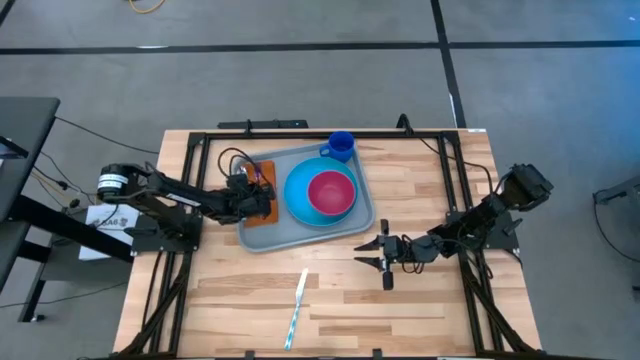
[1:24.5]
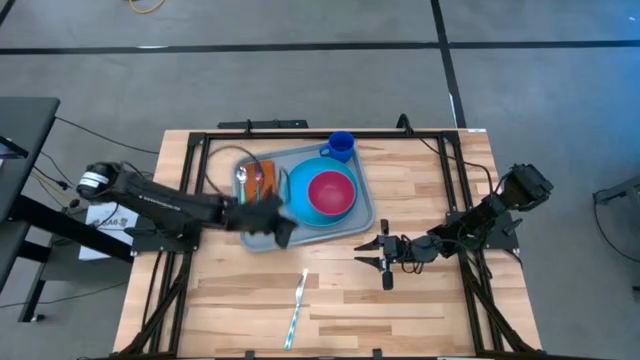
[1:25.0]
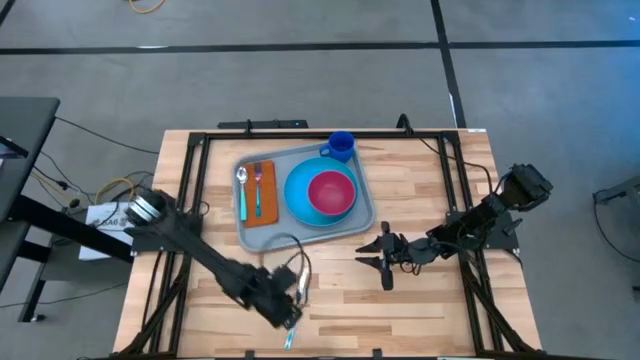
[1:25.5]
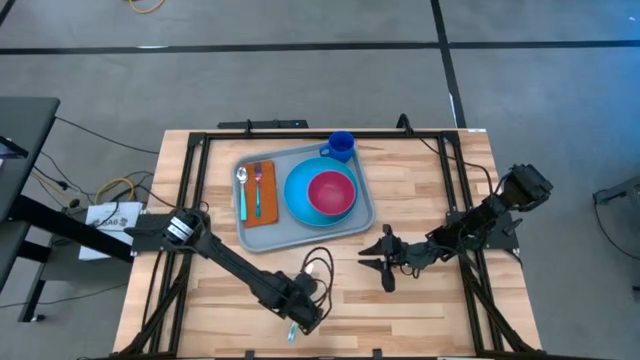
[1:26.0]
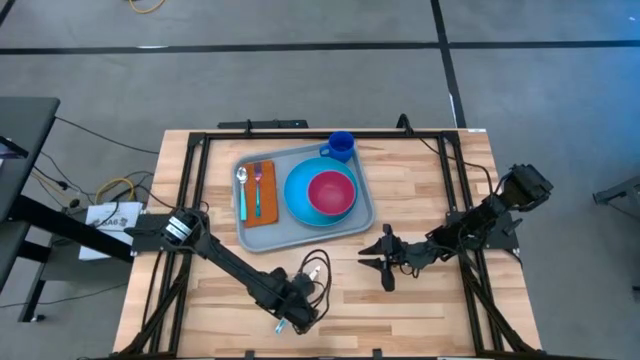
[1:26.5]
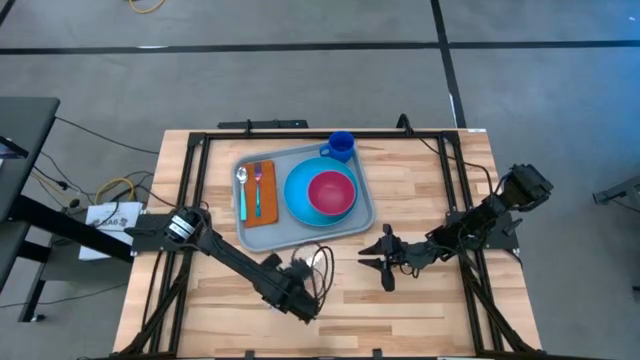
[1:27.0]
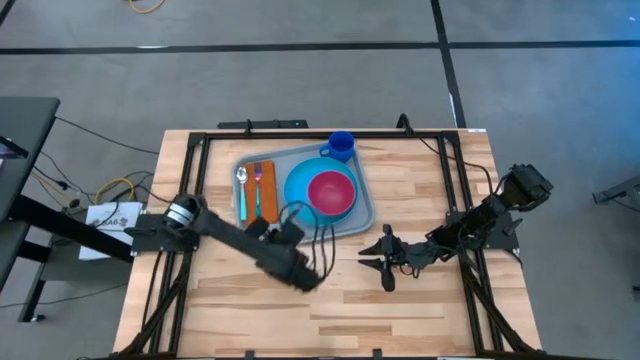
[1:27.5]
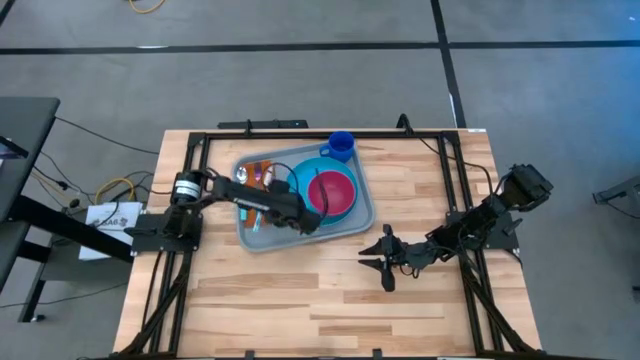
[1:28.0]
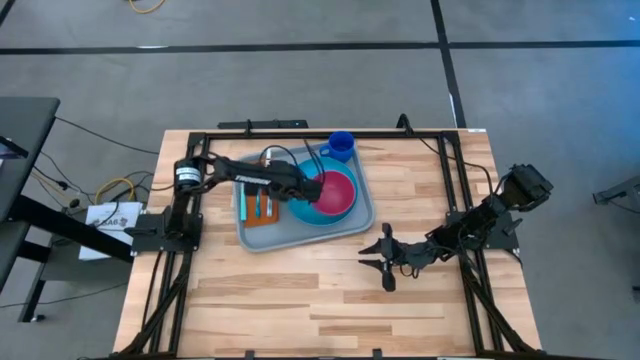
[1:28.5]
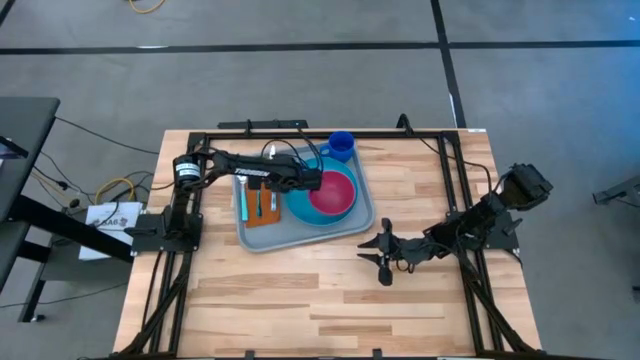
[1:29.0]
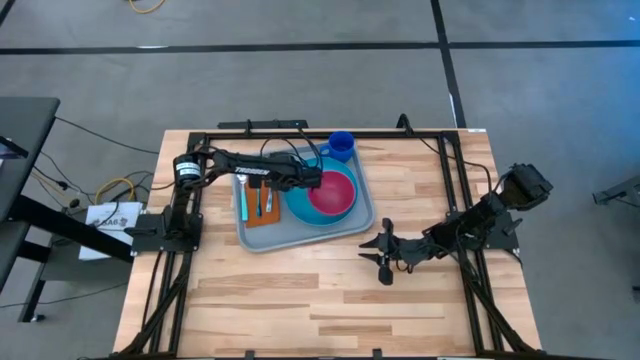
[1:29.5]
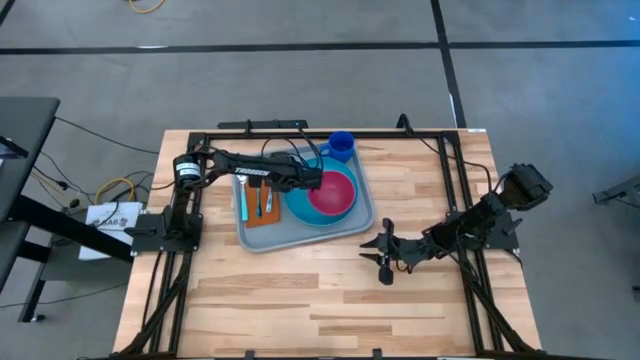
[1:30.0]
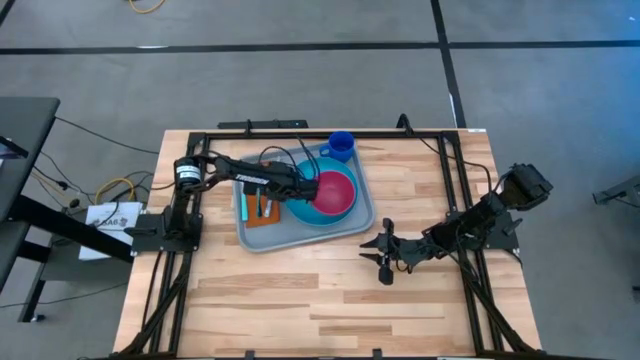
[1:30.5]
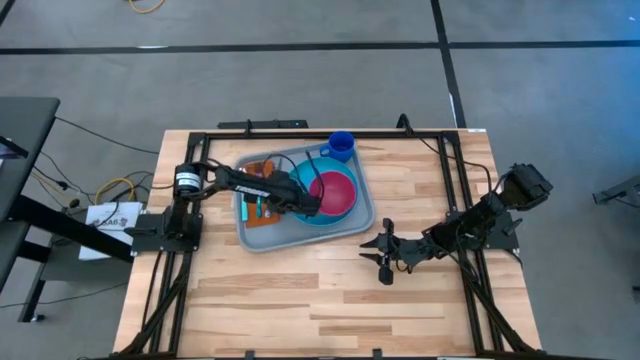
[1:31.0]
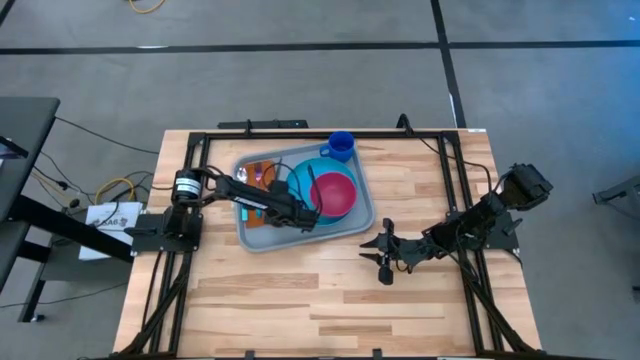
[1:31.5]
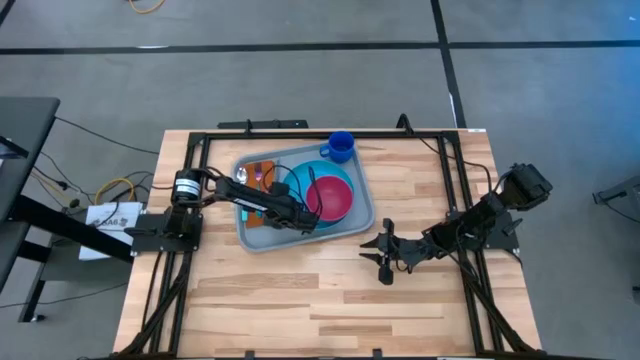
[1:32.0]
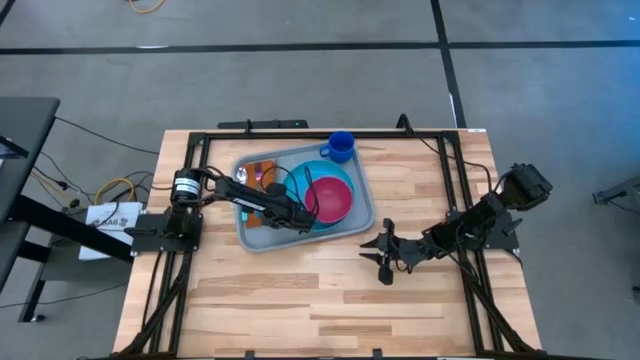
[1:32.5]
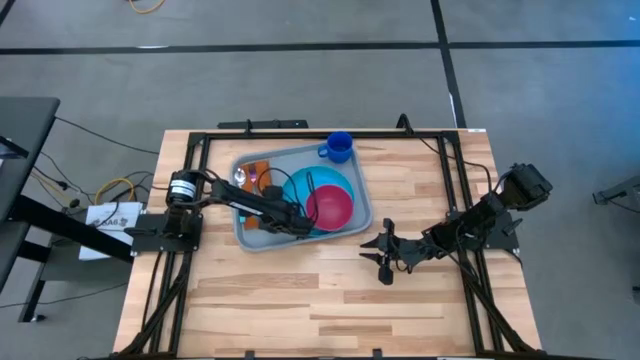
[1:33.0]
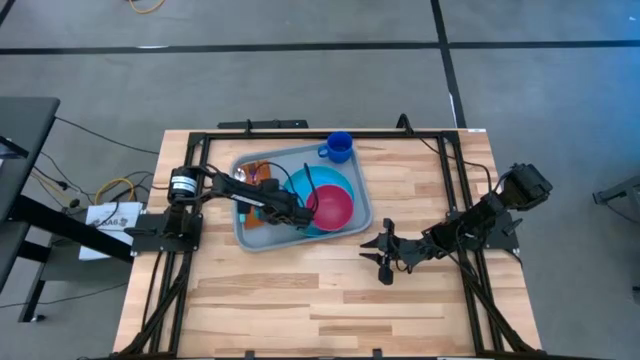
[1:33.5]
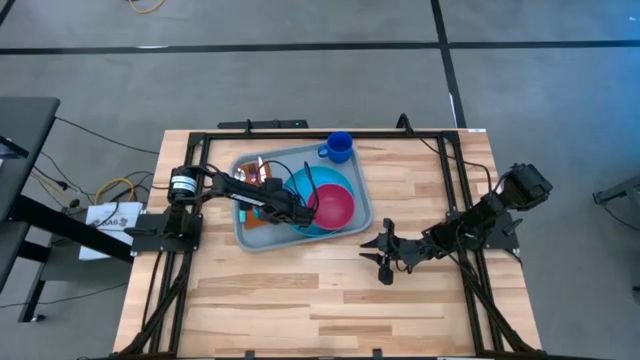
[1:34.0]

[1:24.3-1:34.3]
Task: Set up tray
Put the blue knife on the brown napkin on the gray serving tray

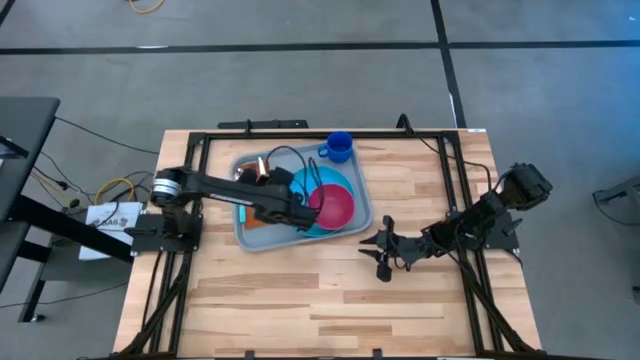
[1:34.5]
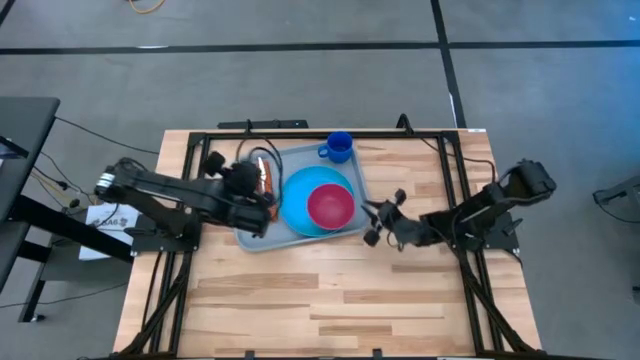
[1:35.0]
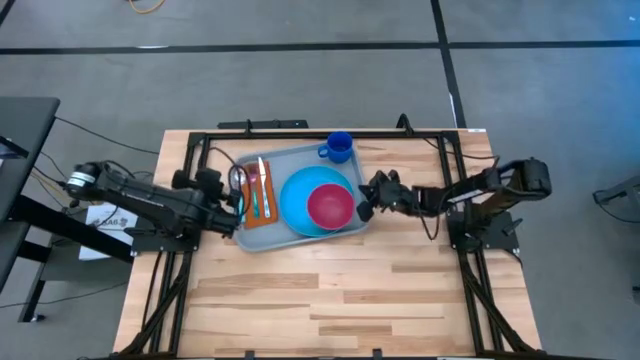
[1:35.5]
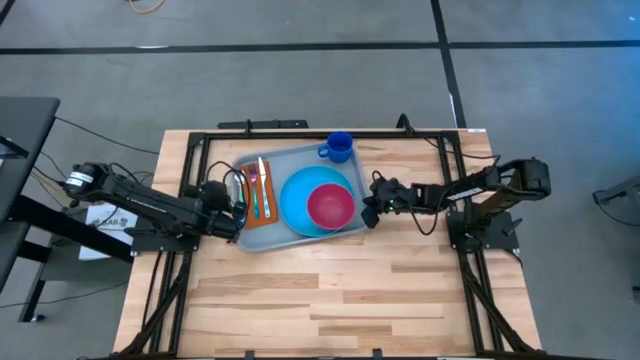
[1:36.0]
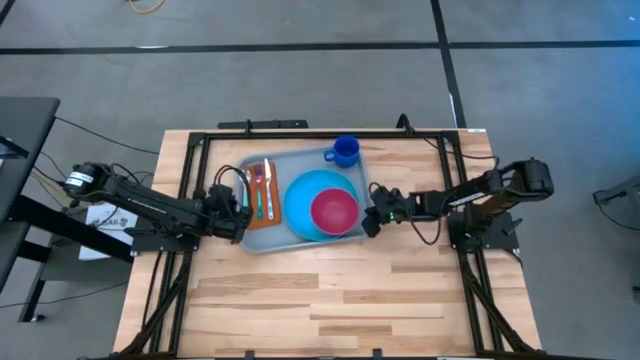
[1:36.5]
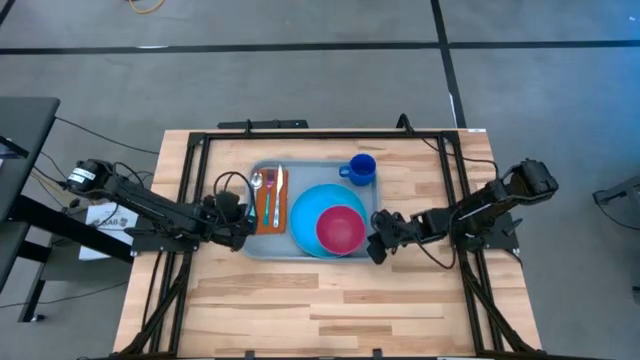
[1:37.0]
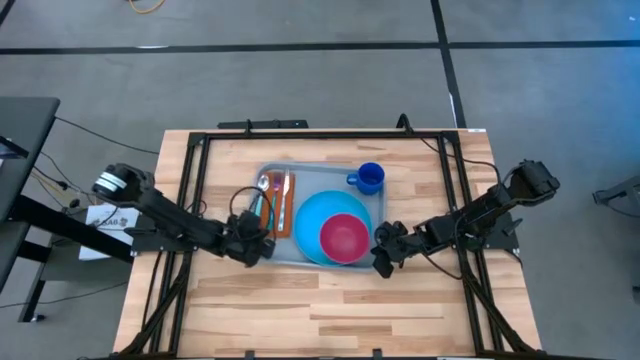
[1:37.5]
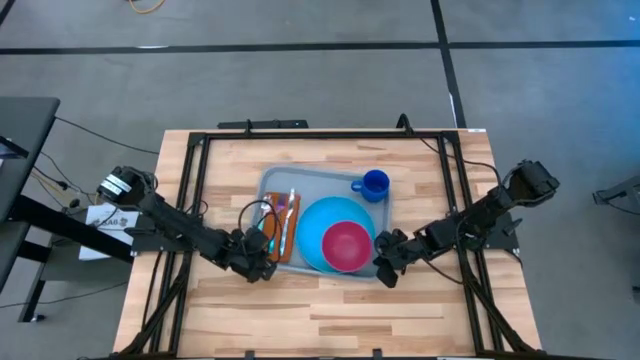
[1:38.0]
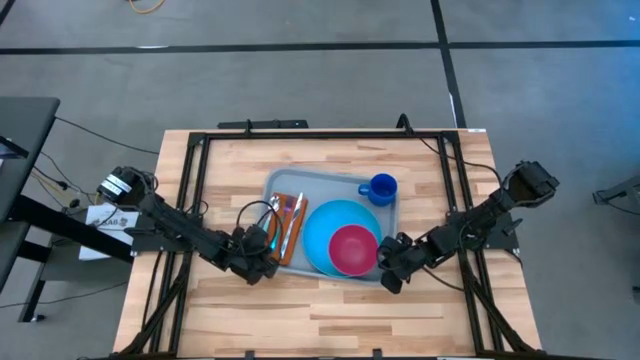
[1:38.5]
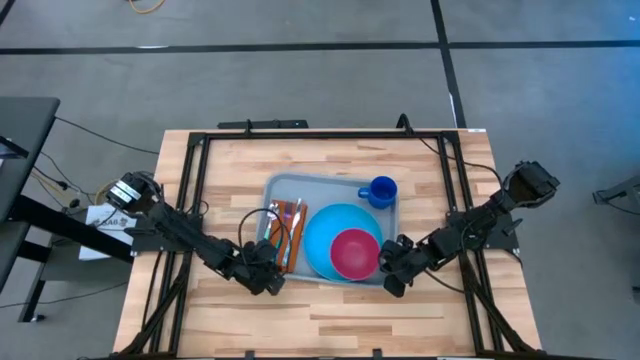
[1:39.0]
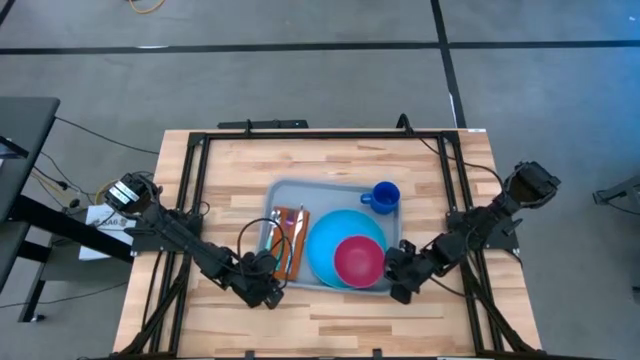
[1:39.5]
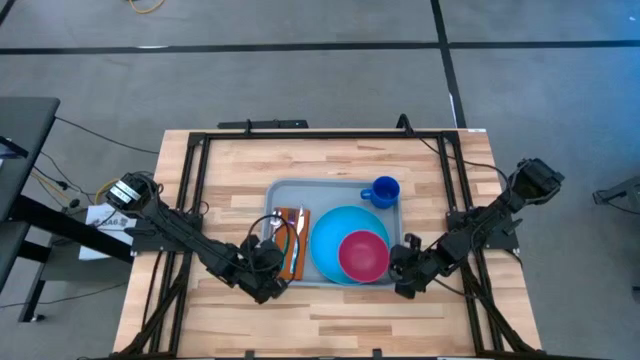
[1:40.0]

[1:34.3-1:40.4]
Move the gray tray to the center of the table

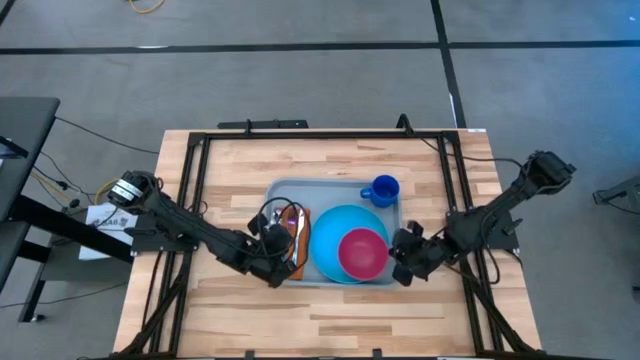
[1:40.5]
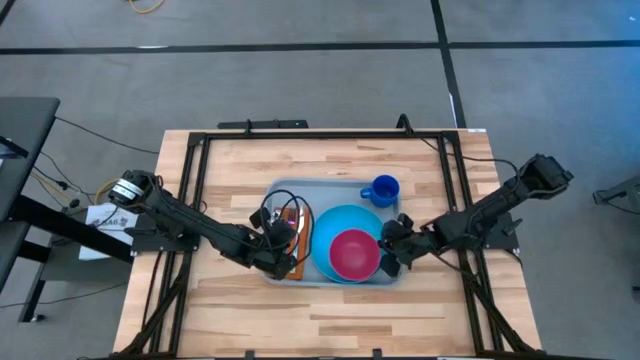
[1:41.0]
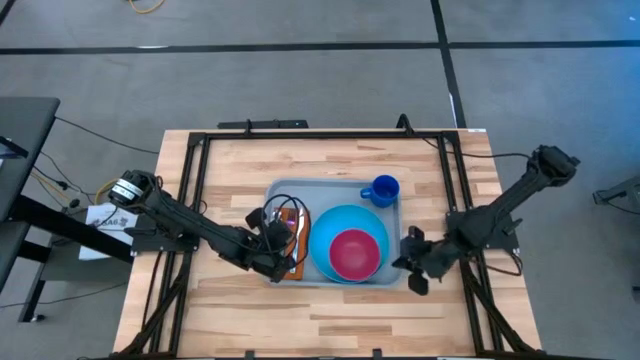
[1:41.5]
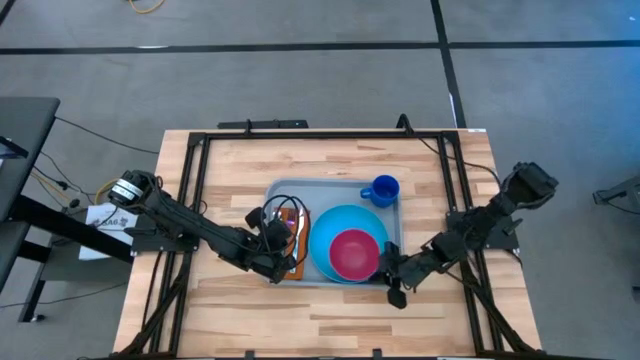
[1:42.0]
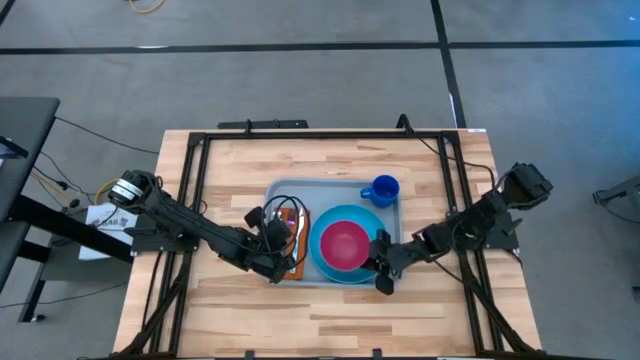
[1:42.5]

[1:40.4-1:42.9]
Adjust the red bowl on the light blue plate on the gray tray

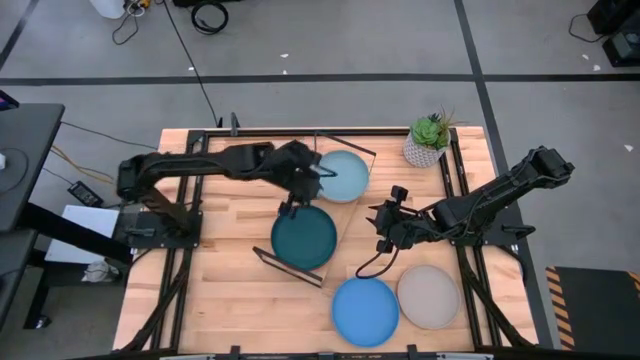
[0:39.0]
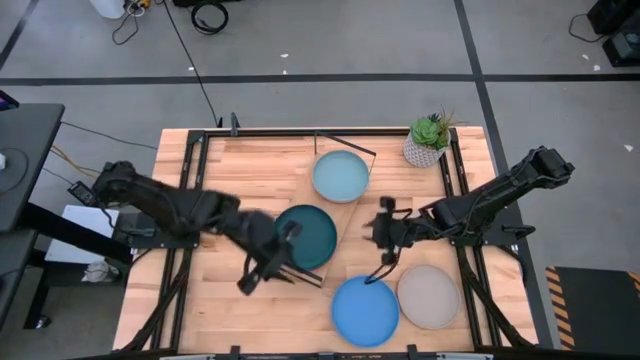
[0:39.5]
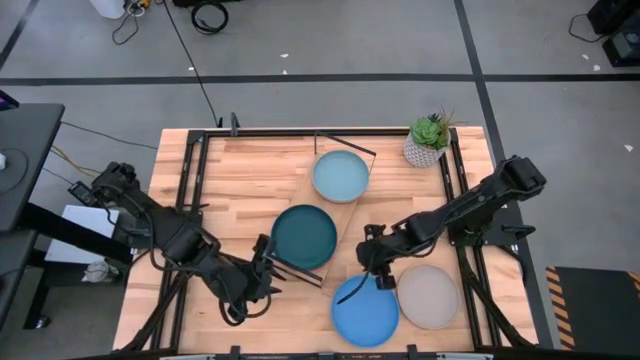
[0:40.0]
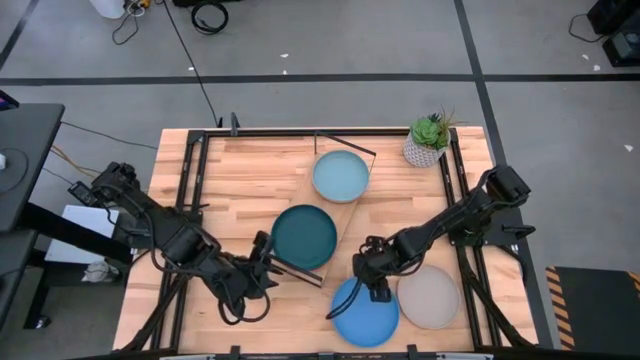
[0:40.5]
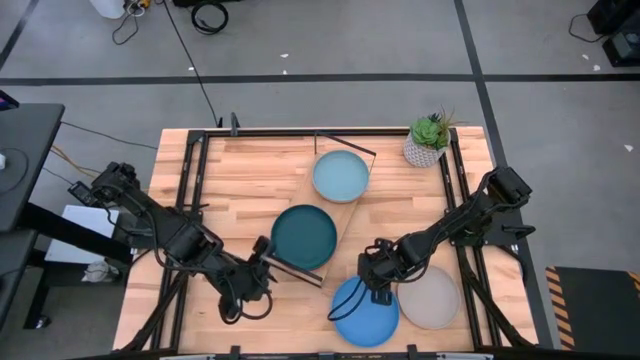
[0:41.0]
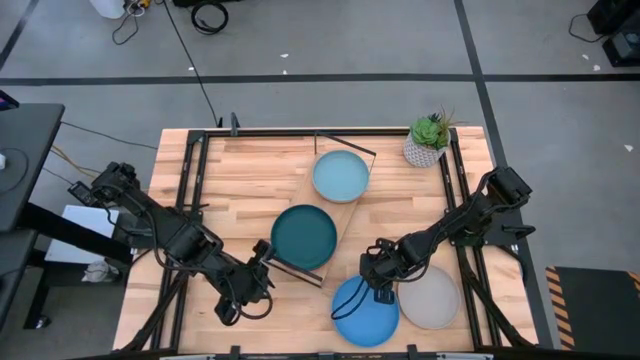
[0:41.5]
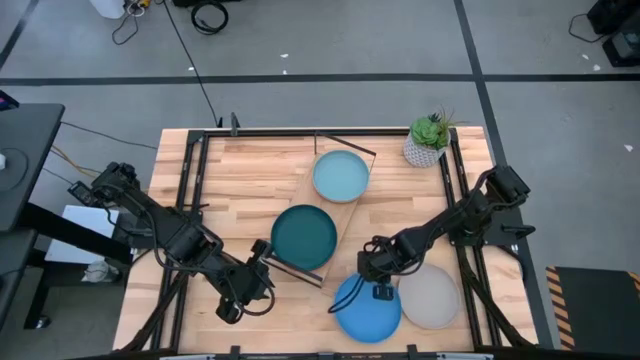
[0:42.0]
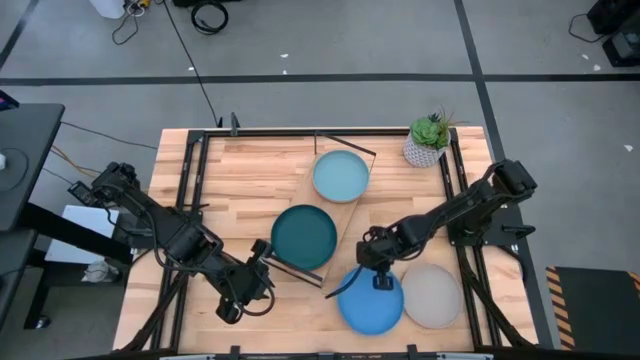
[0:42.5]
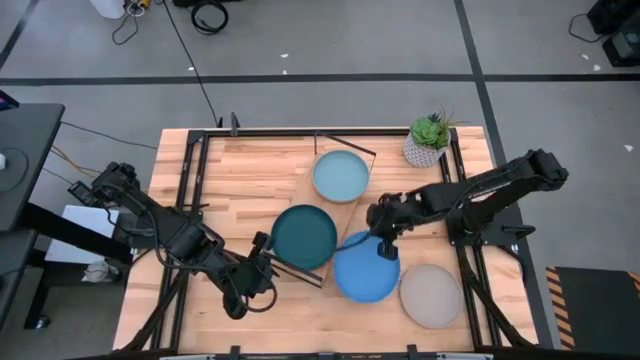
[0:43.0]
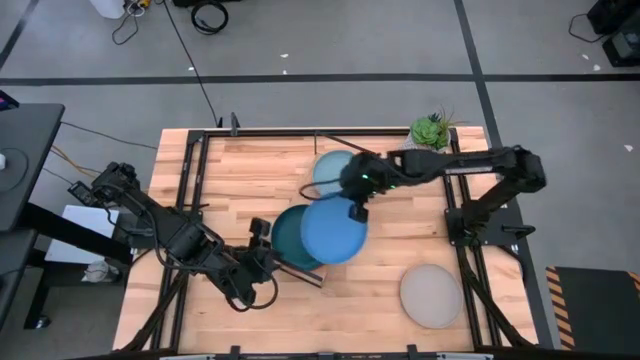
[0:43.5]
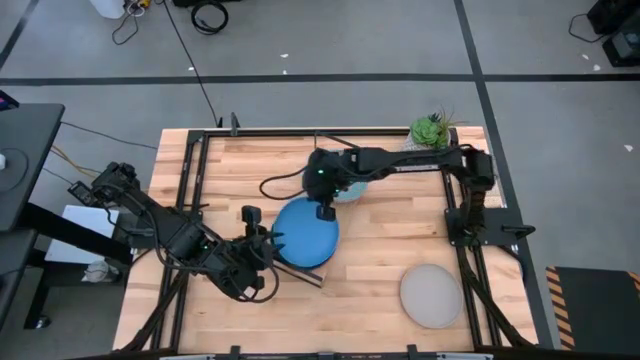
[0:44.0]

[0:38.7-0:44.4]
Task: Place and stack plates onto a shelf
Stack the blue plate on top of the dark green plate on the shelf
